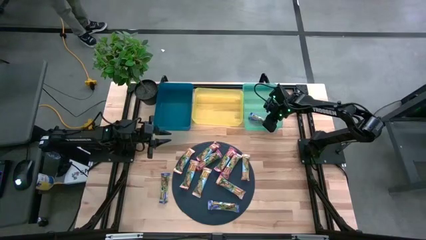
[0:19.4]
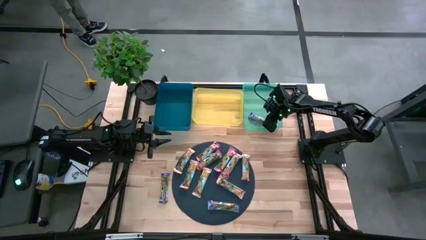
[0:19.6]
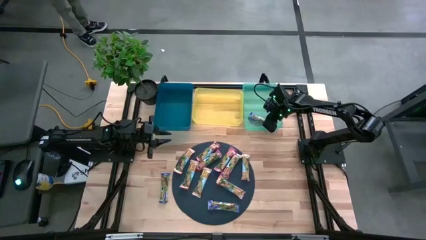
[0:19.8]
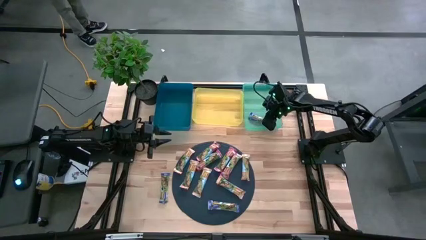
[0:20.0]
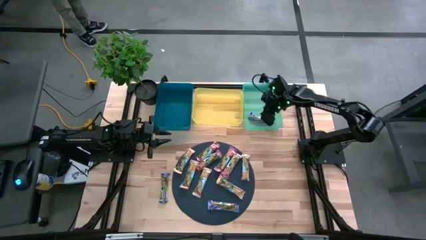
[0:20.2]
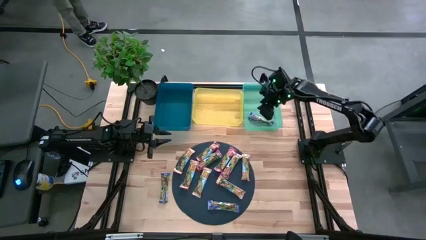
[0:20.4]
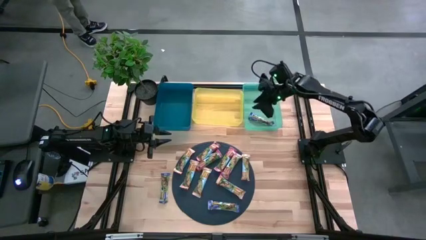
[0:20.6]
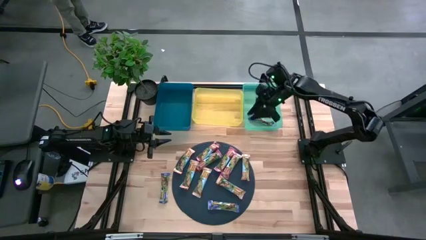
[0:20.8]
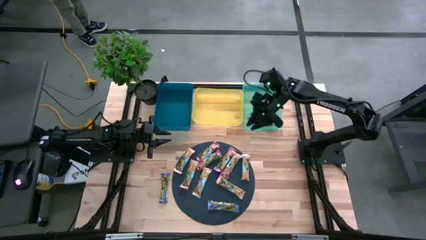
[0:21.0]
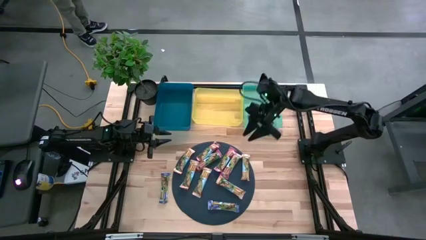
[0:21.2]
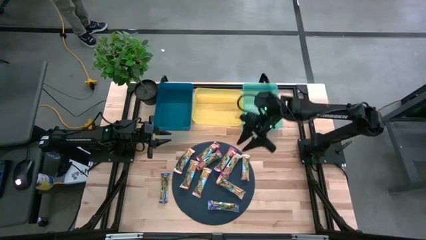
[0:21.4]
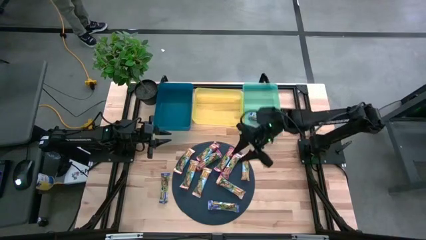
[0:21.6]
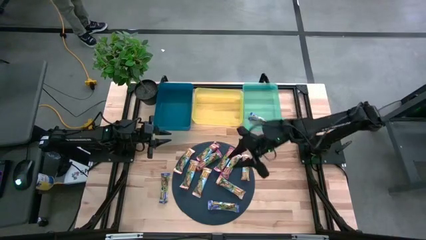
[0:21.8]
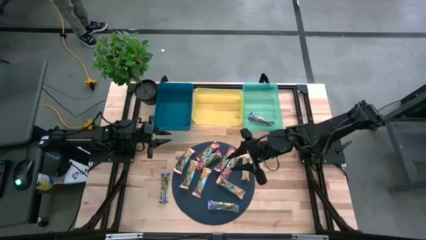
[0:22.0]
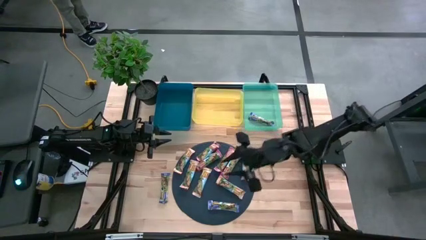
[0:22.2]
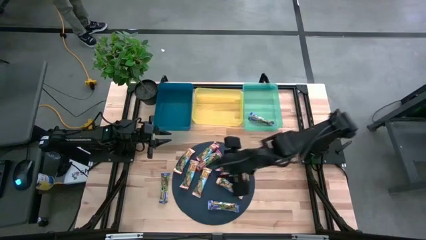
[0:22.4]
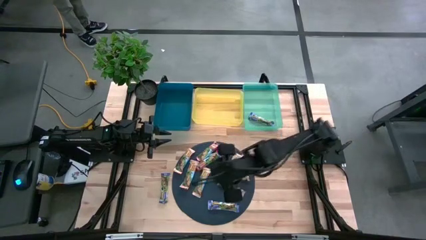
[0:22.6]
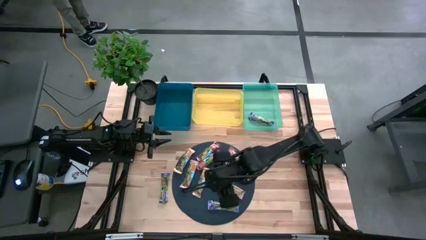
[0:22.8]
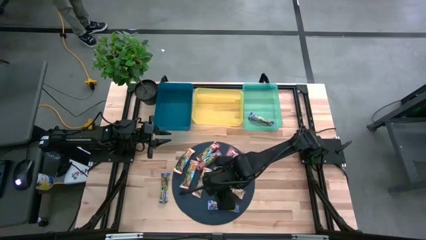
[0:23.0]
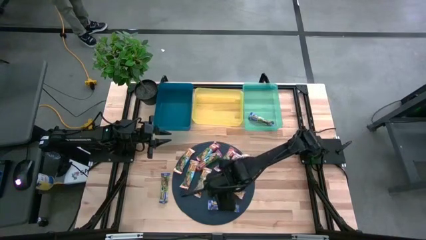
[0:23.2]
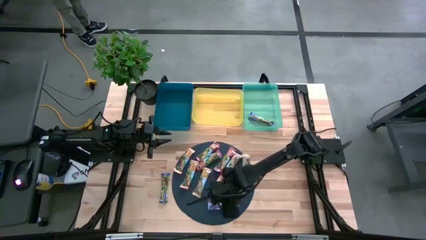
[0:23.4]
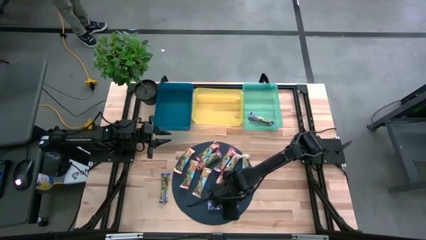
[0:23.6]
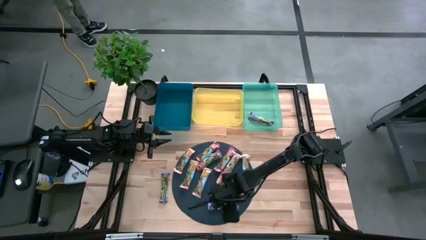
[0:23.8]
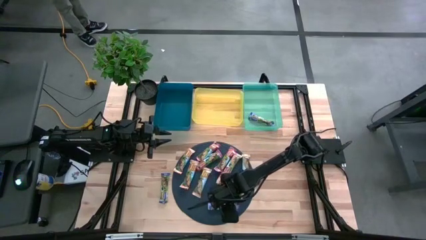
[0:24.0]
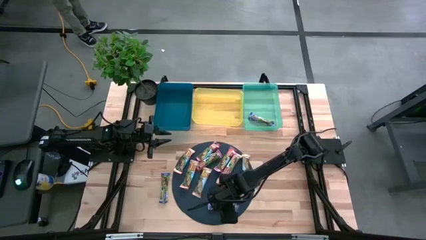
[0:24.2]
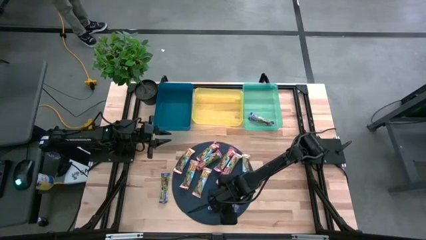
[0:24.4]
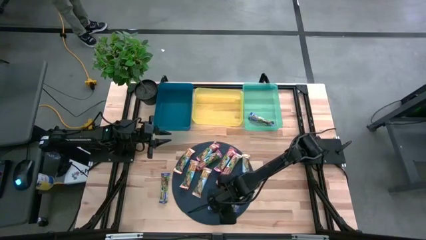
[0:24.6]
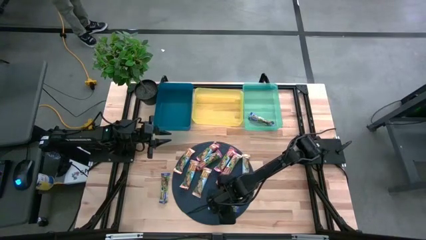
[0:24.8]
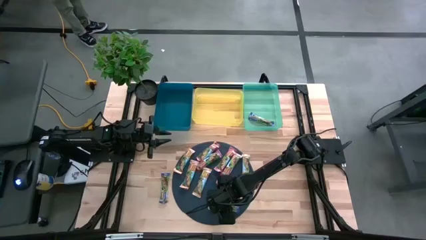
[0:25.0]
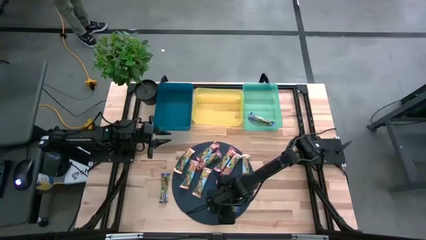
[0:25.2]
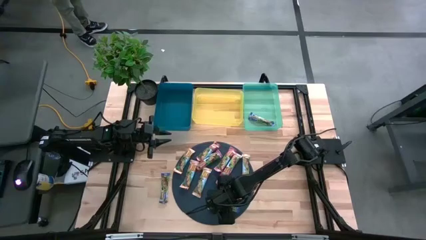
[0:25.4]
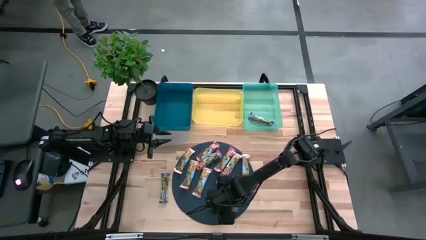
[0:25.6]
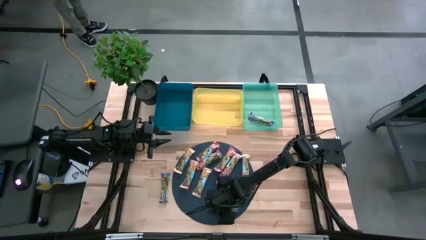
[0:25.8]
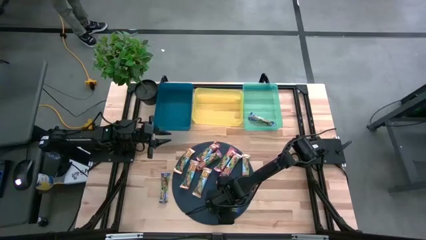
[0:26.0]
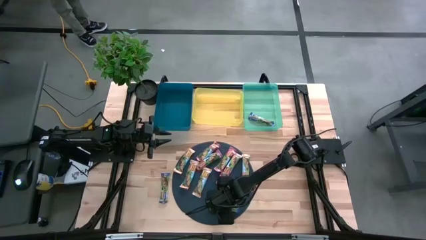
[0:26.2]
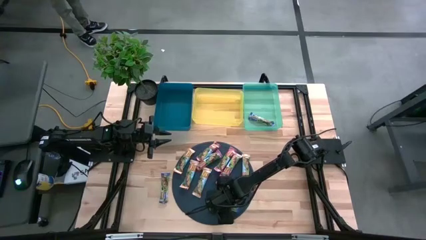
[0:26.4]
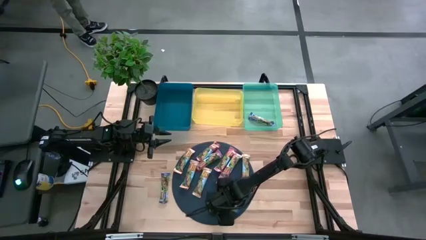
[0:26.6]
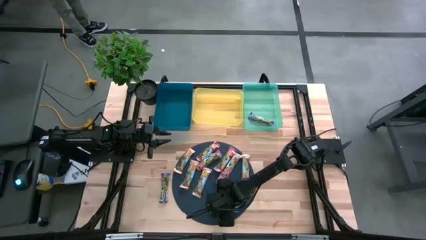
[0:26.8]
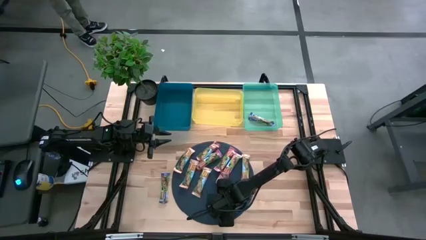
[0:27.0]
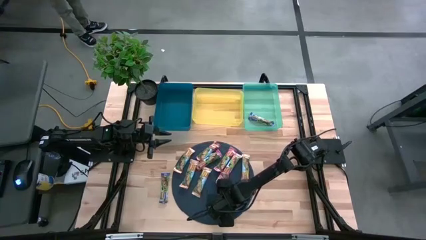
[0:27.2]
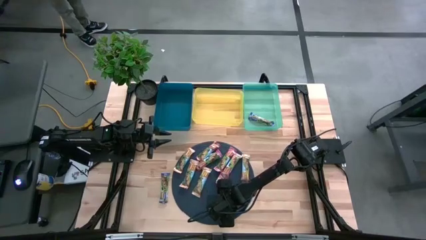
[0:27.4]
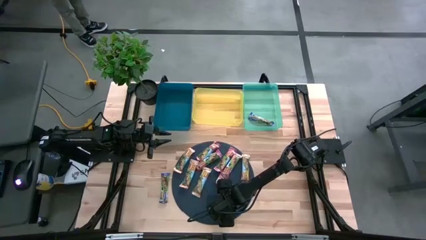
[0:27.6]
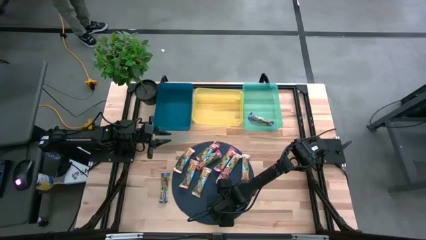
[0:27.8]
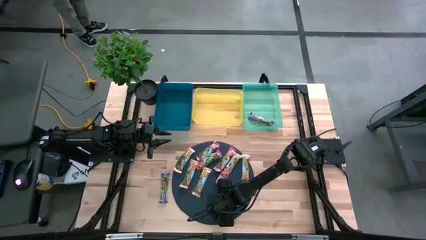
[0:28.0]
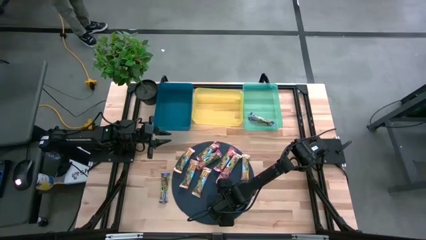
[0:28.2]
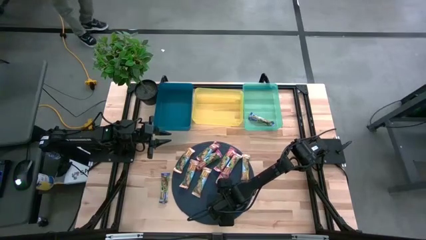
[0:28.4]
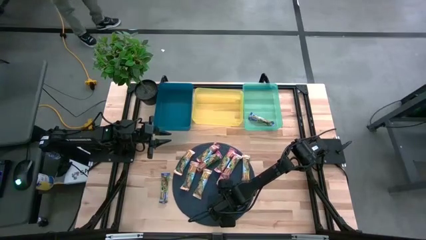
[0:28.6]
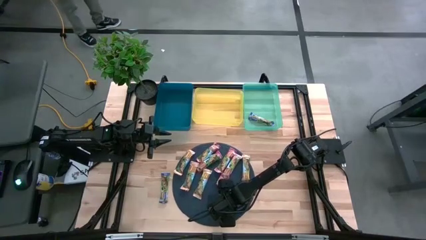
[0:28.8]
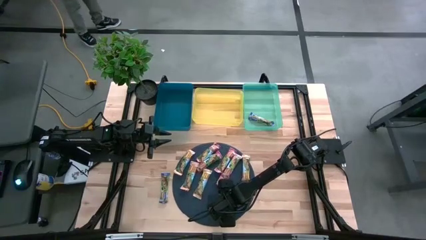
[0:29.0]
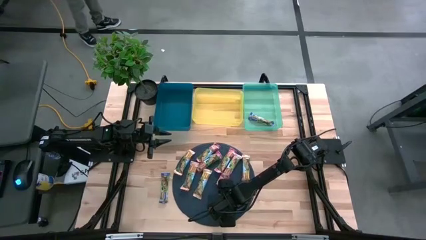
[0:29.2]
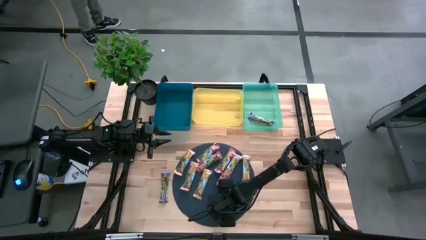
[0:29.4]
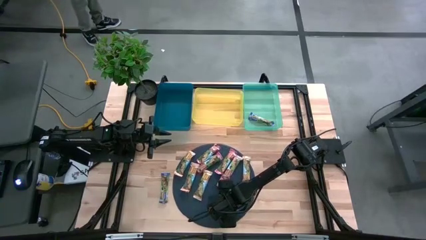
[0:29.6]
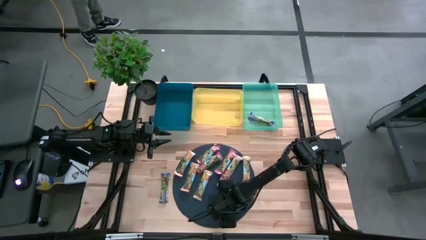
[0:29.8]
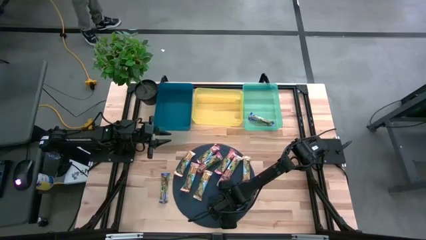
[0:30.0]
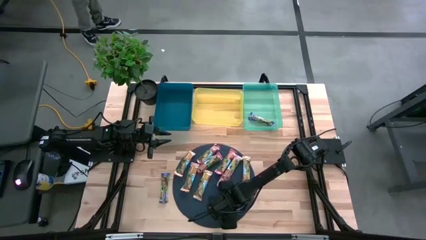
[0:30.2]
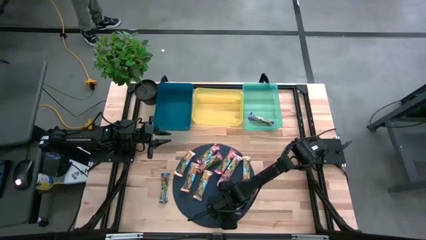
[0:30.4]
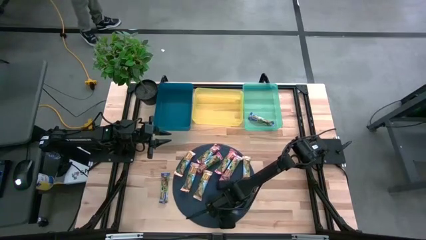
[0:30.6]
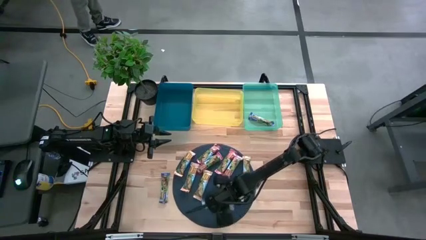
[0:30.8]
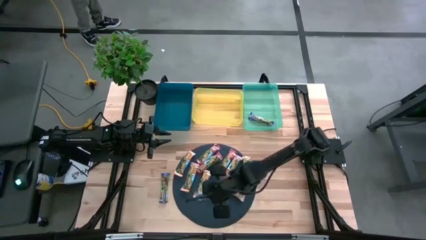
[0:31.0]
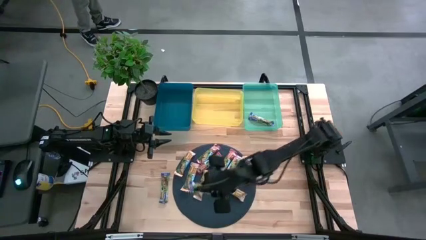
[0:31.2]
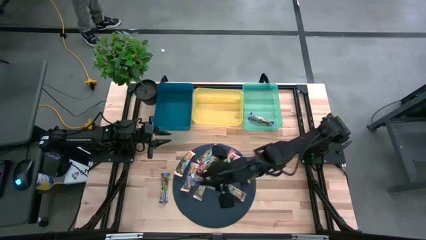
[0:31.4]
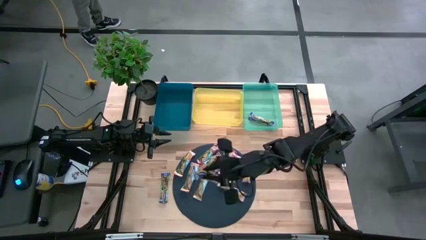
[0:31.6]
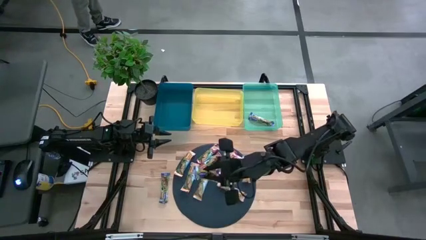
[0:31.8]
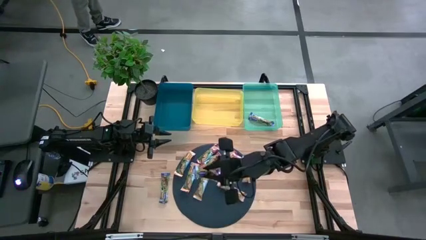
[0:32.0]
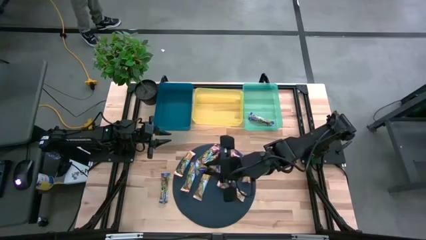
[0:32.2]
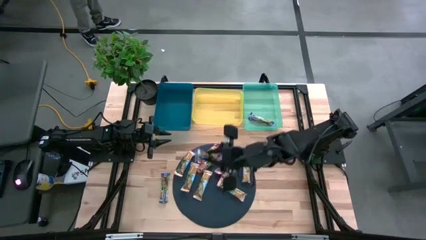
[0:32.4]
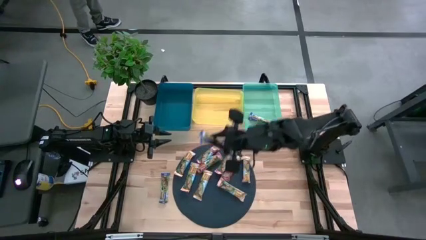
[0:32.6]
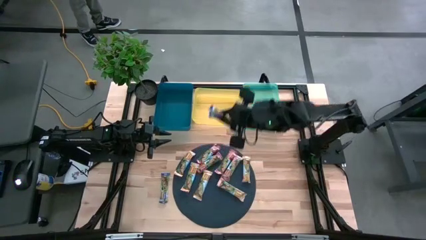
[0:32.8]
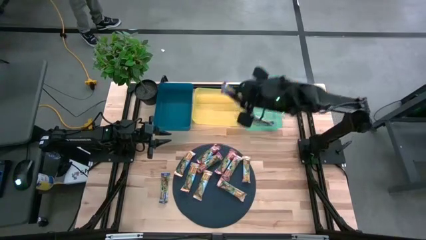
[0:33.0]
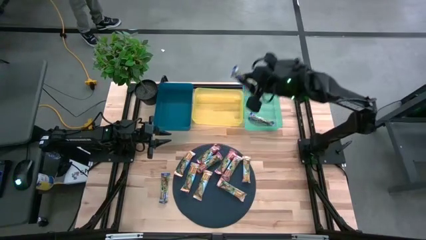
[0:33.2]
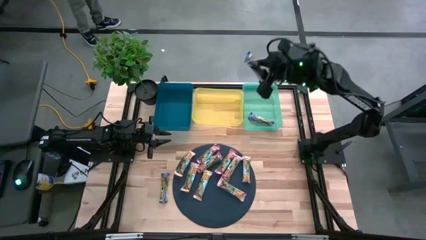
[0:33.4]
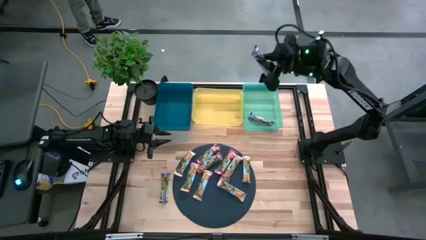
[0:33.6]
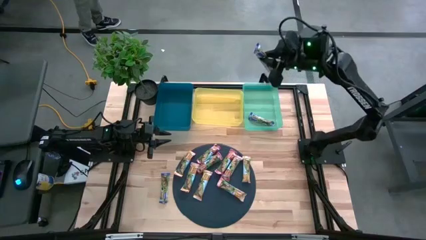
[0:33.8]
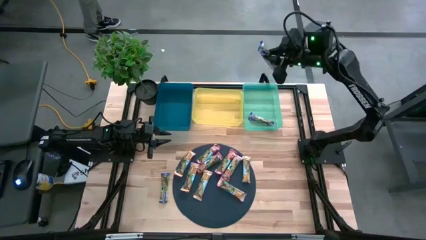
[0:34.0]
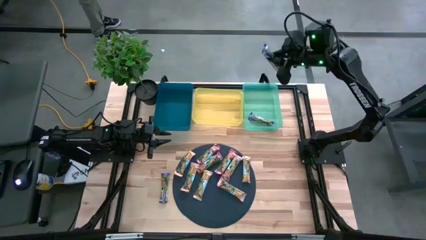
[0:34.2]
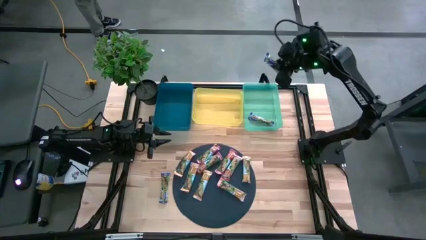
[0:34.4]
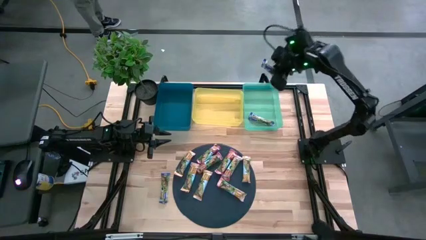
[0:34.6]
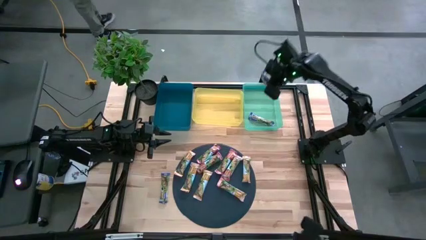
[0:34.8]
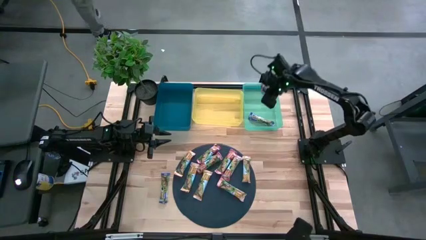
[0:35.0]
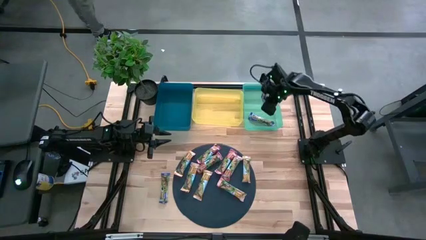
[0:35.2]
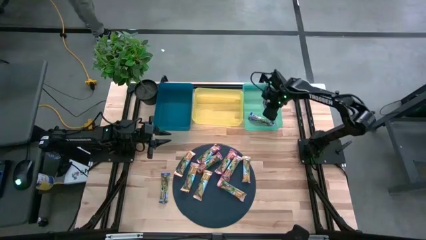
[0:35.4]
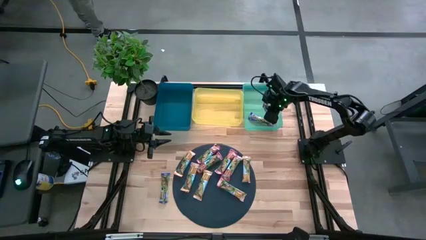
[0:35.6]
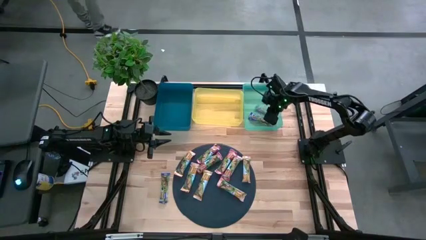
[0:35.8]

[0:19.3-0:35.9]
Task: Pick and place Granola Bars by type
Put the blue granola bar into the green bin
